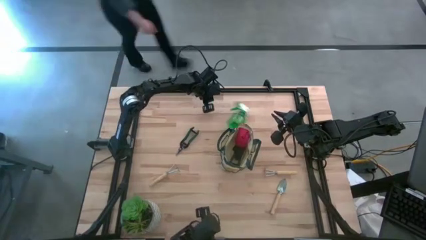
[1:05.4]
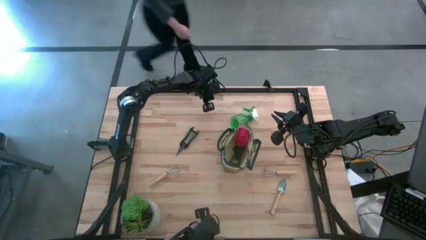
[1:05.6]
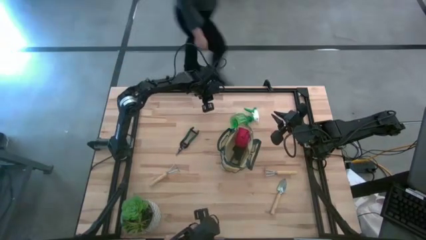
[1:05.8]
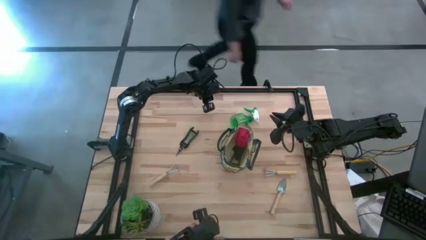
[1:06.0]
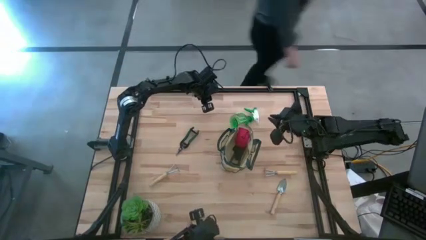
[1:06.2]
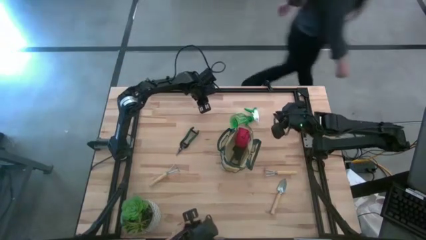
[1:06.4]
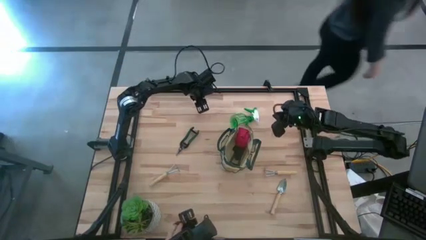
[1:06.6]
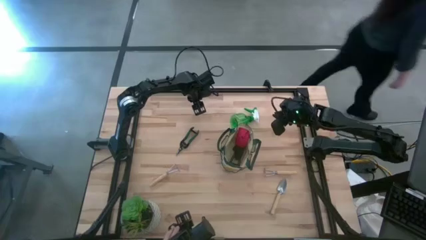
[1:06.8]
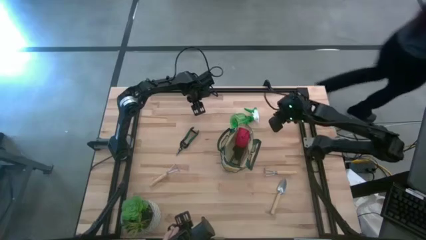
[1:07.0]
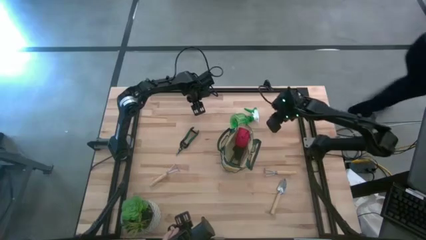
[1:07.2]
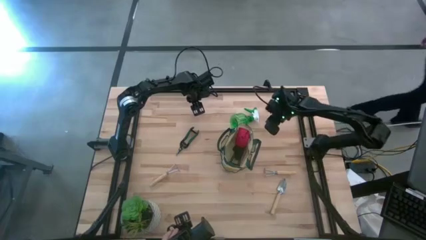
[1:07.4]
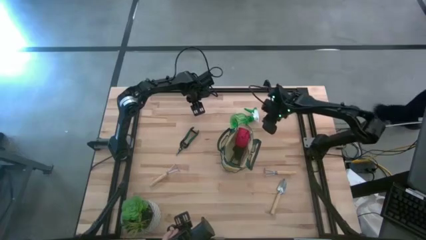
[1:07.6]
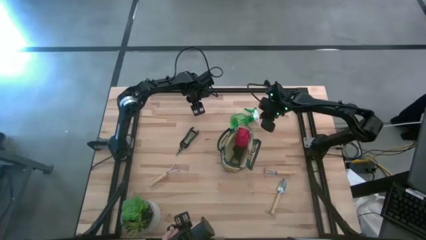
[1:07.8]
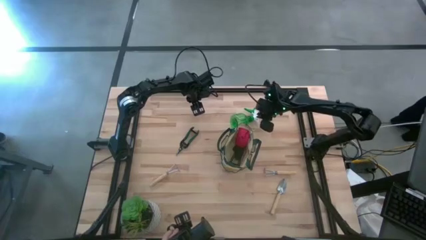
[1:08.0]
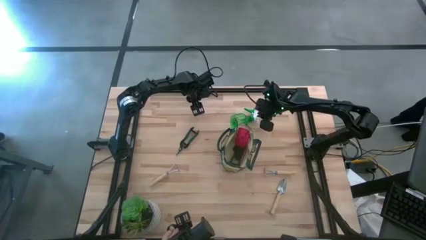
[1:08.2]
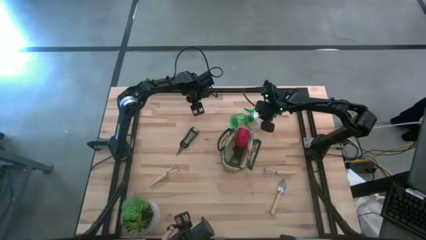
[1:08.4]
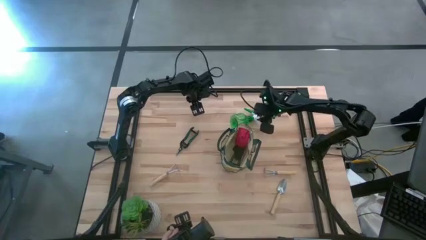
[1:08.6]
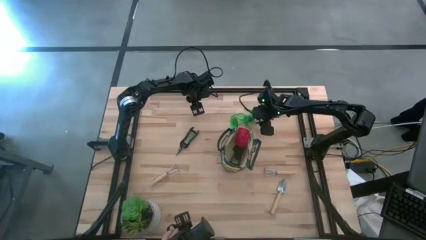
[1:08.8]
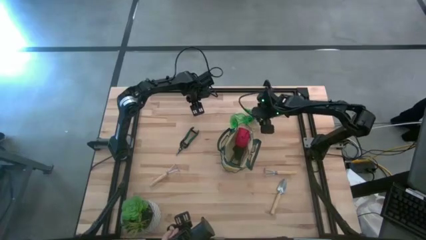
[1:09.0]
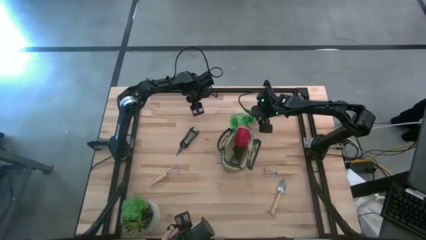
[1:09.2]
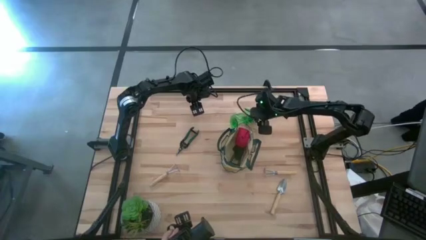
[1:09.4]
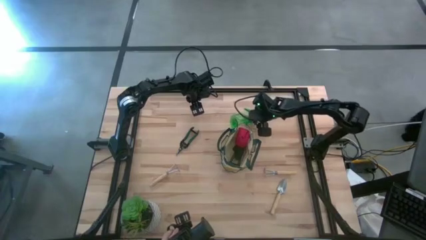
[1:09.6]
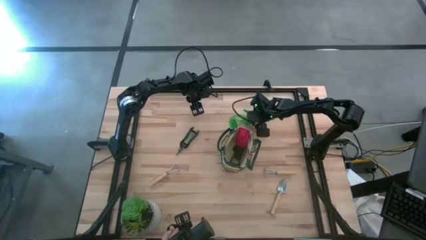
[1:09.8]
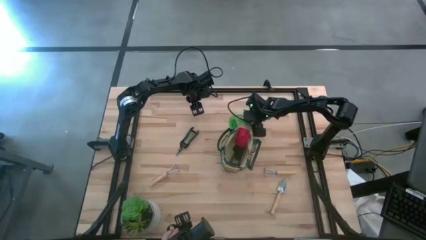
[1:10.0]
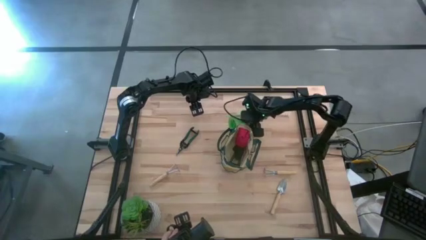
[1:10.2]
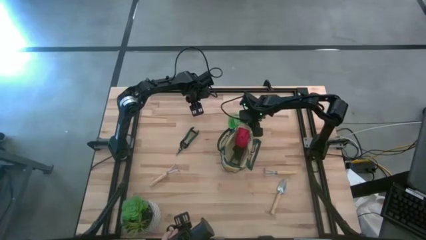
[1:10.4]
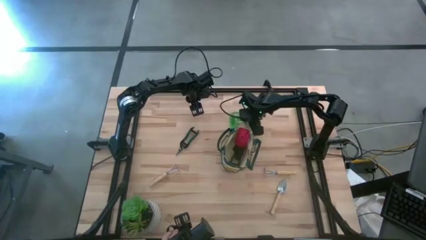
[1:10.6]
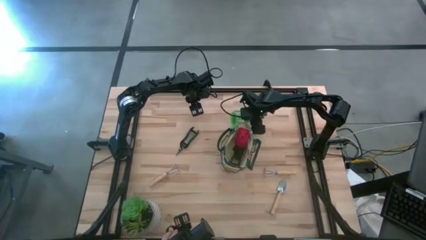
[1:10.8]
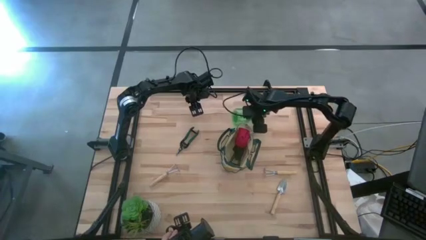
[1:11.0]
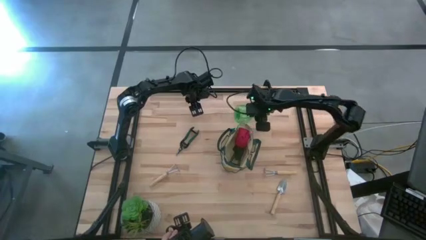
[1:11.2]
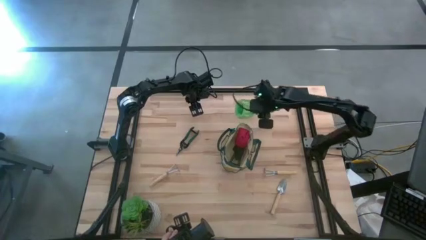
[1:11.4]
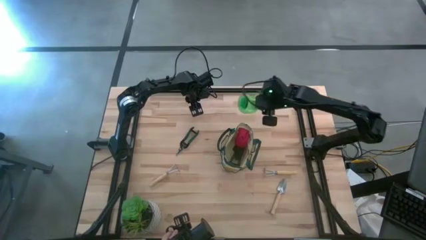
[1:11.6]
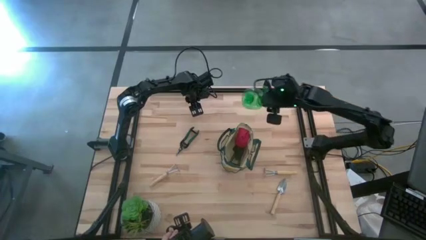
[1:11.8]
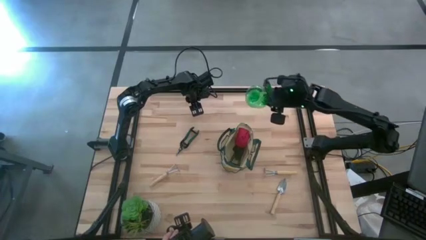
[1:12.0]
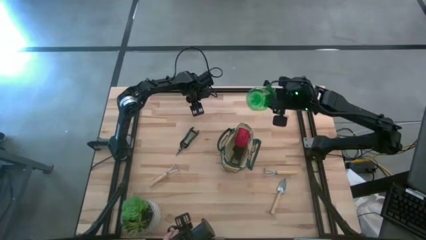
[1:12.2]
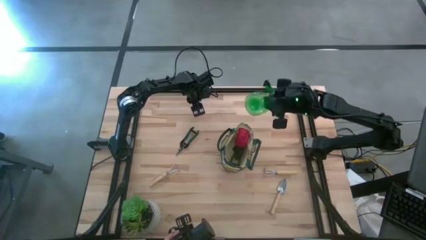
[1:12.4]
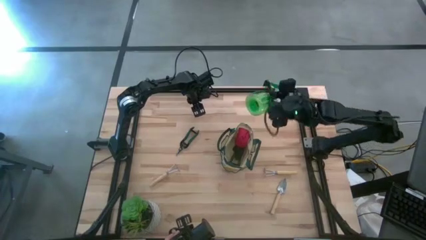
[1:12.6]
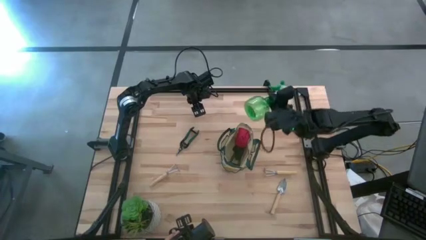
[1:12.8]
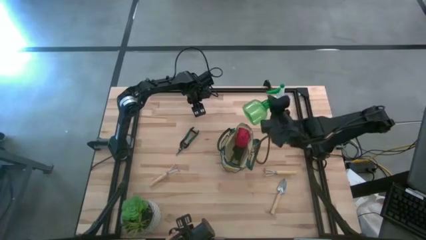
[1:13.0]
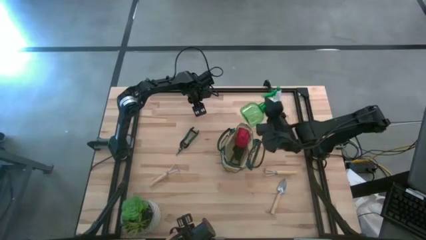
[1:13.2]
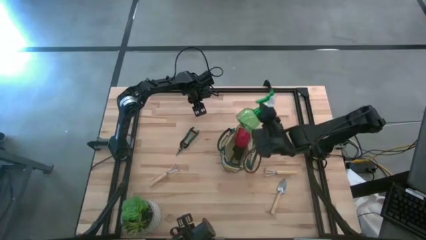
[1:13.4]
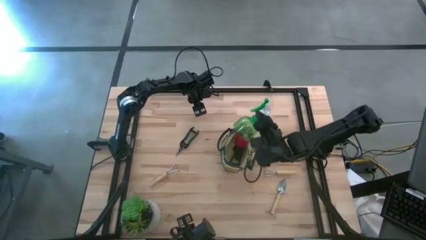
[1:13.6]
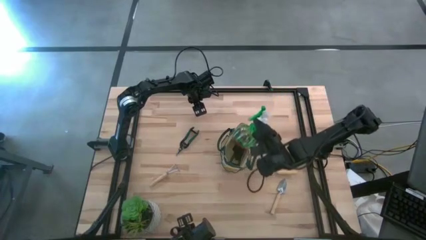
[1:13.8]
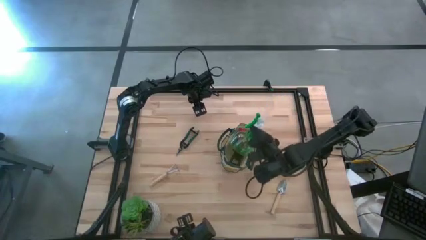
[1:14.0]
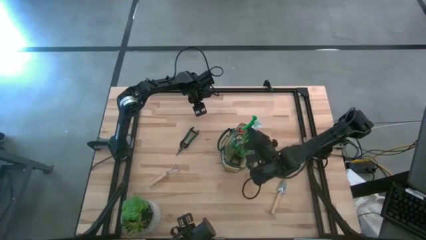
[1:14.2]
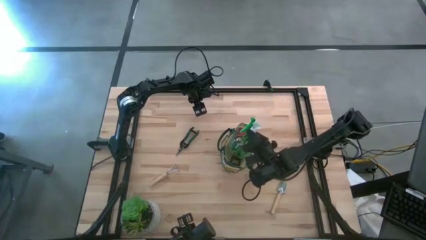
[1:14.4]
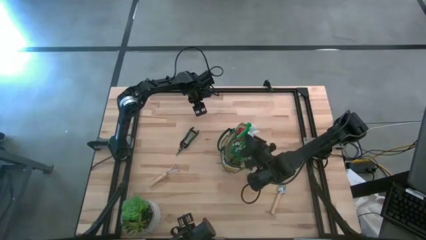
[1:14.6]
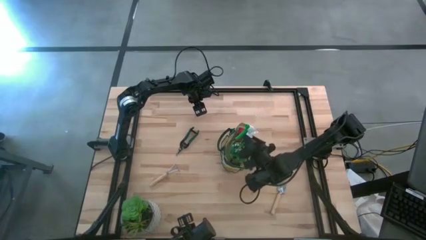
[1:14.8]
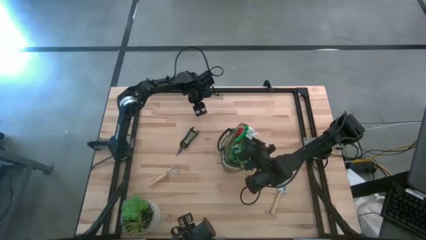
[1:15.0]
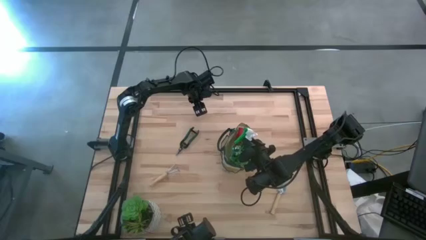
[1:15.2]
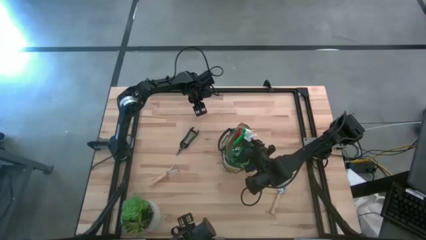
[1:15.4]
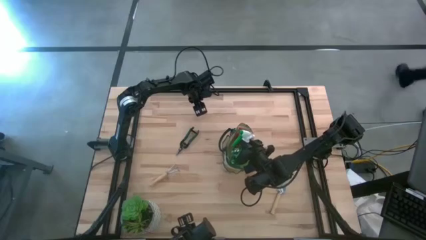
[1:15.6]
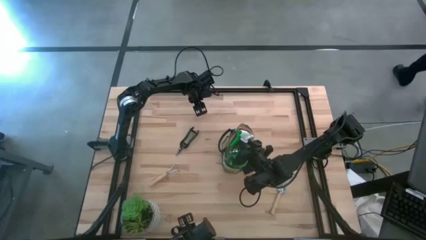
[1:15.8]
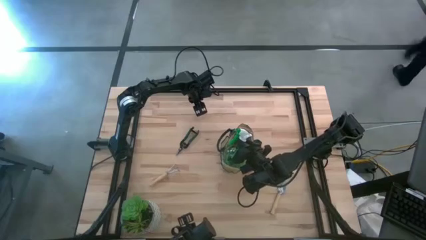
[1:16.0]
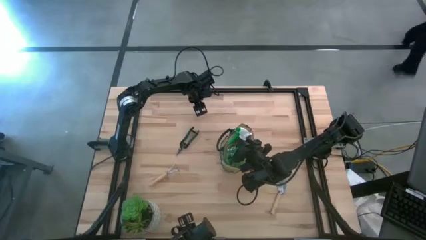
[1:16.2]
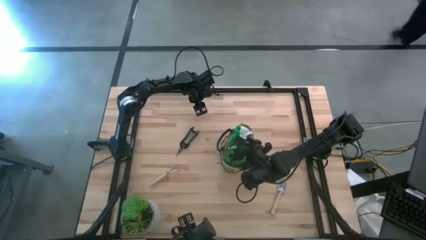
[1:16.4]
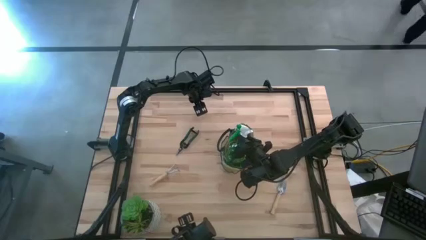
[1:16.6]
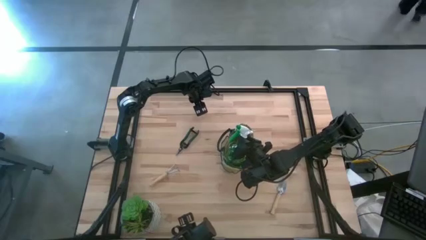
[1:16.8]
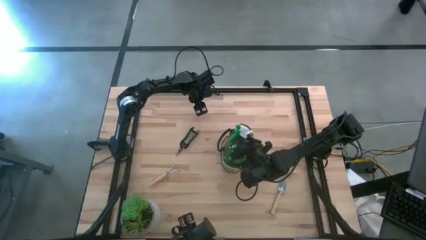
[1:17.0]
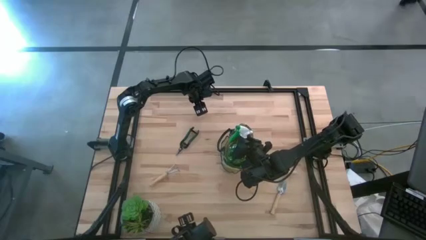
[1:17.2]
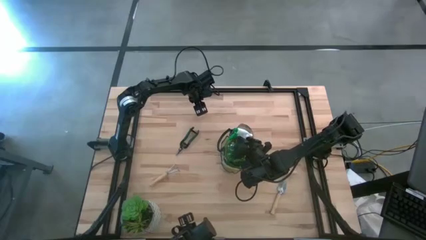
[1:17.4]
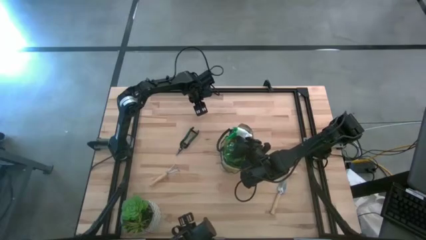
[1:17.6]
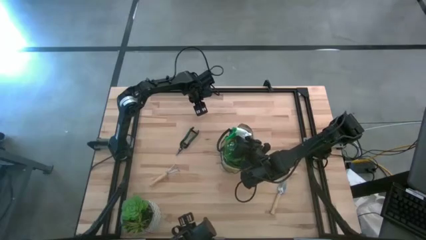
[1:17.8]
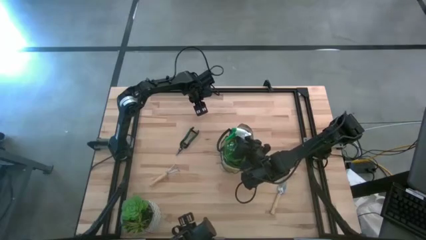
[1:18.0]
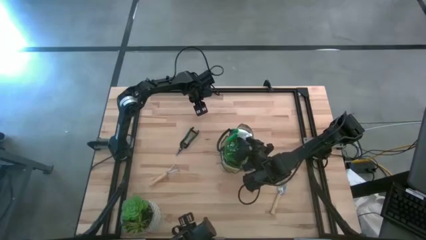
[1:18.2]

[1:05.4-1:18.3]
Task: Pick & Place Garden tools in Gardening bag
Put the spray bottle into the gardening bag
